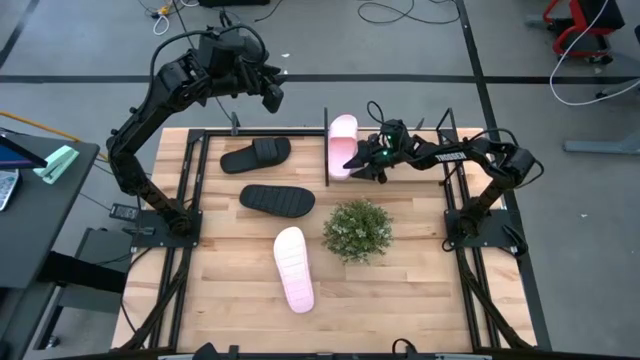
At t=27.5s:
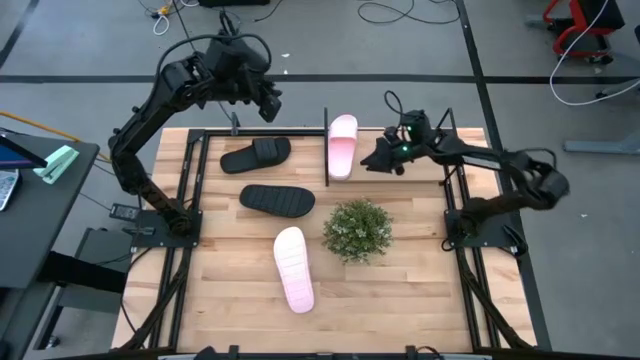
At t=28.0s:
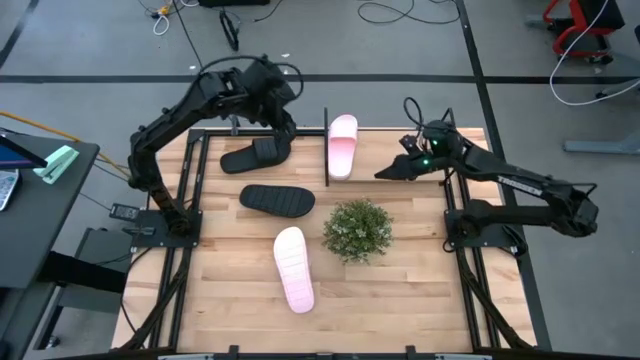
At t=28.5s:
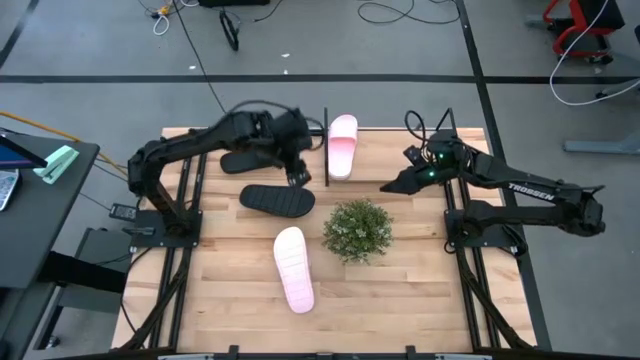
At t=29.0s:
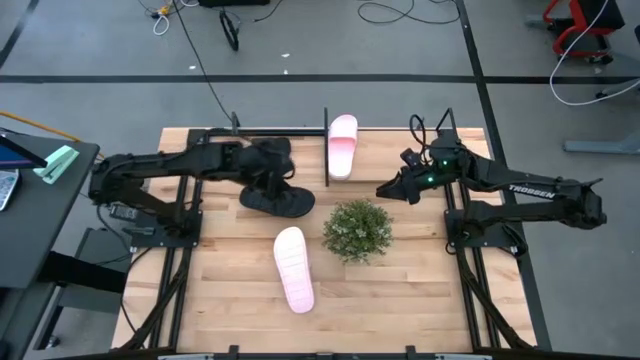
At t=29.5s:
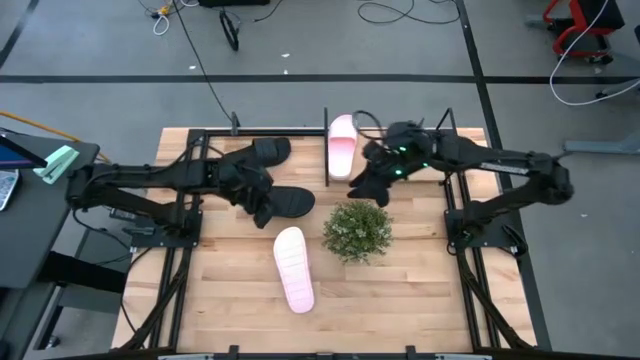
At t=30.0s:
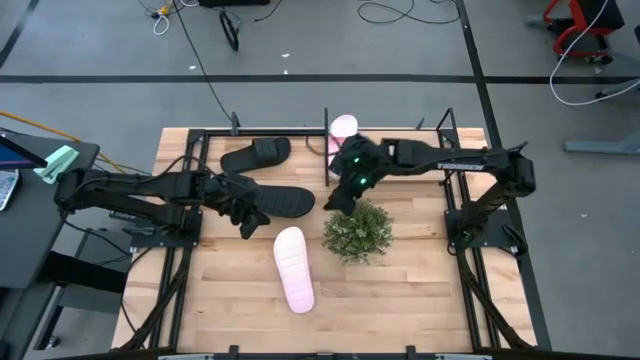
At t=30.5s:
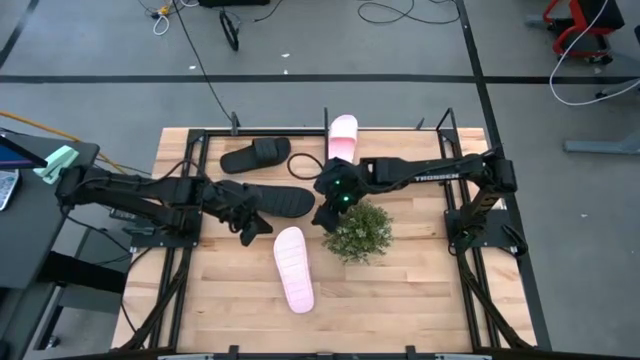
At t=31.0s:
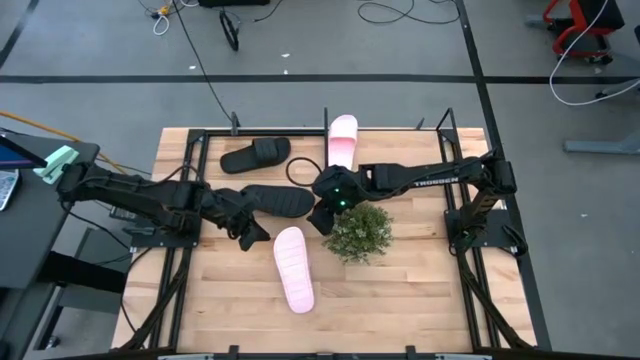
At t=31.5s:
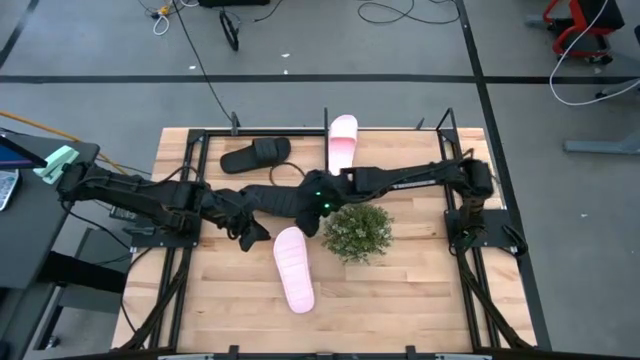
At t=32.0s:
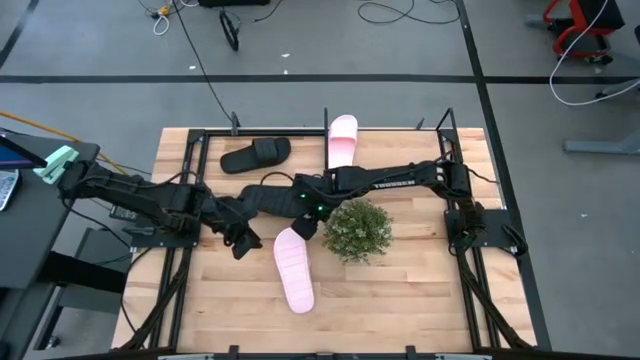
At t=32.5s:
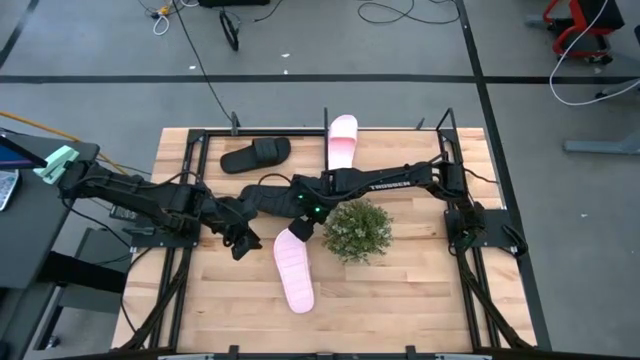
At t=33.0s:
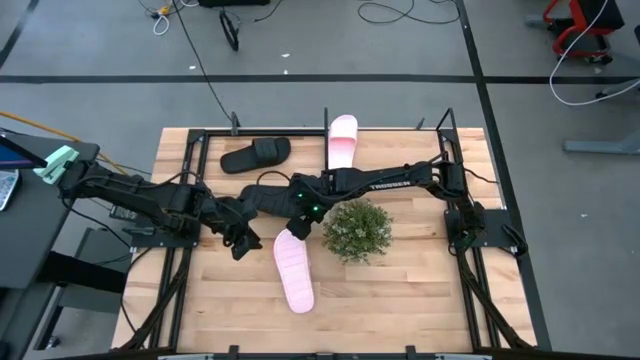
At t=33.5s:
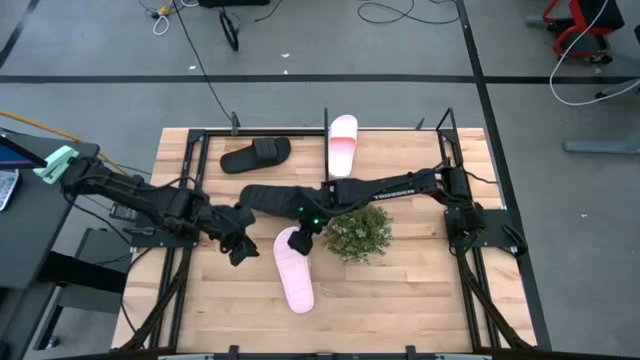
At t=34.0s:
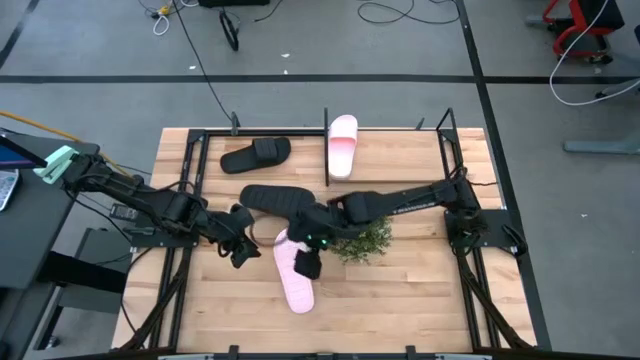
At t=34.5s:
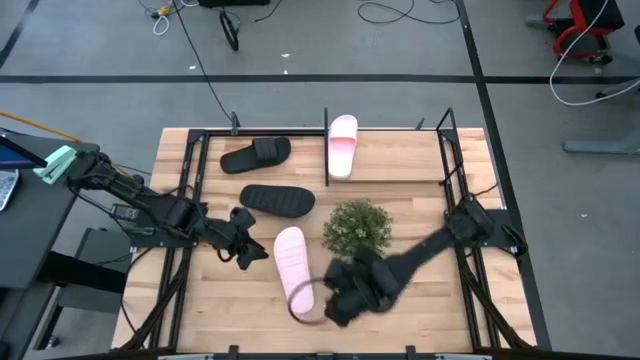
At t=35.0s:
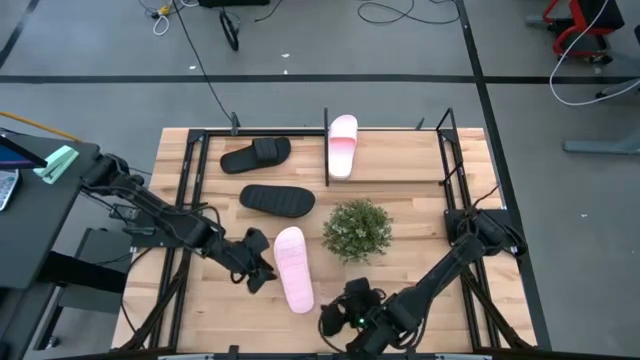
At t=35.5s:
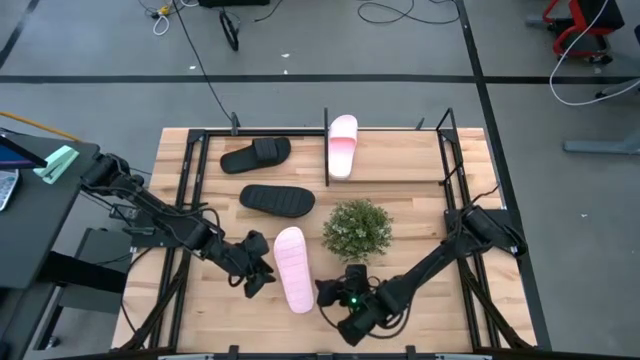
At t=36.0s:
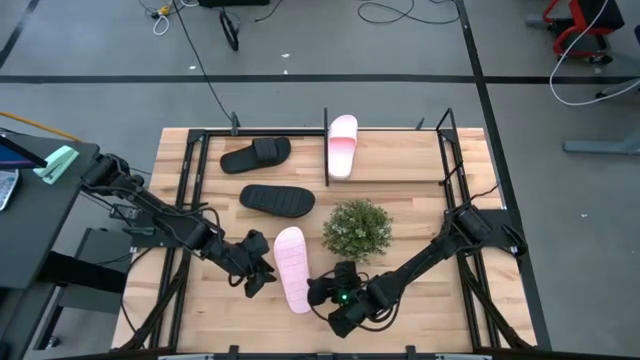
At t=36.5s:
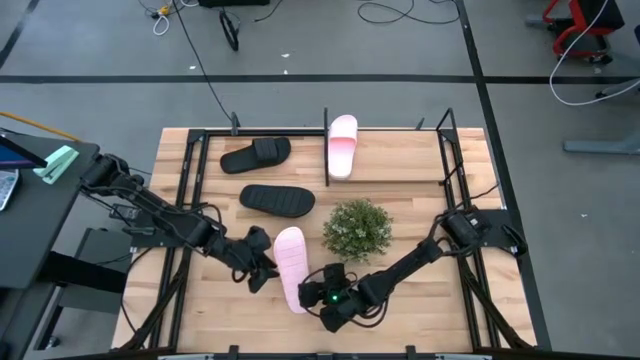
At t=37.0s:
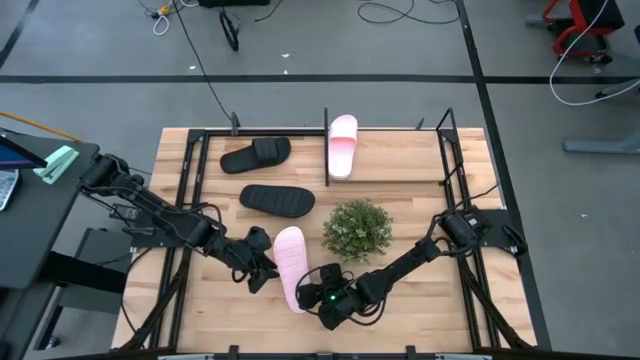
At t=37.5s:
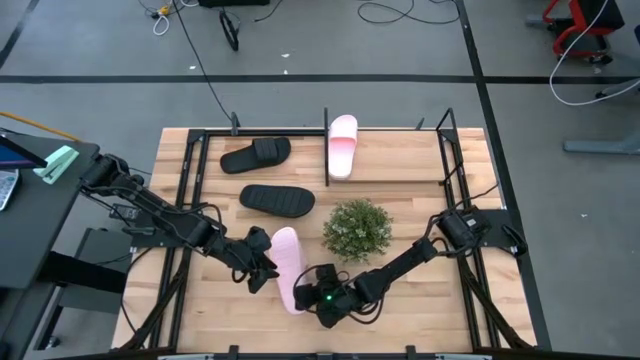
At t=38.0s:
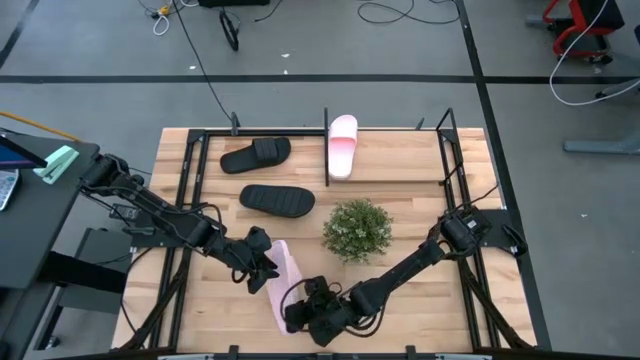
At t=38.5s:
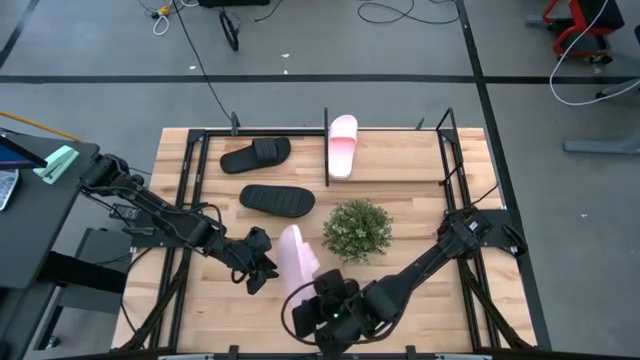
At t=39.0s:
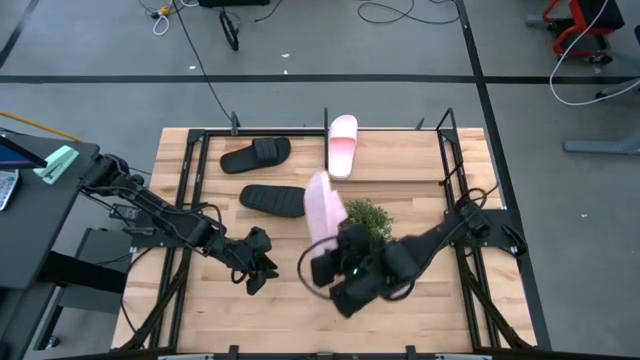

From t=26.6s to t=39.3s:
Task: Pick and place slides into the shelf
Put the pink slide on the shelf
